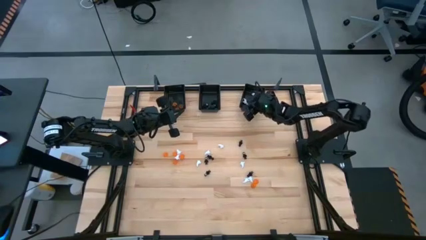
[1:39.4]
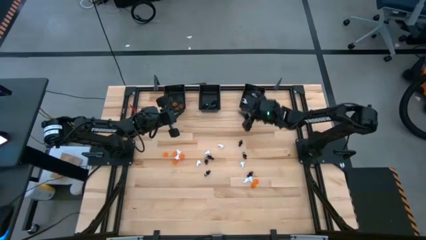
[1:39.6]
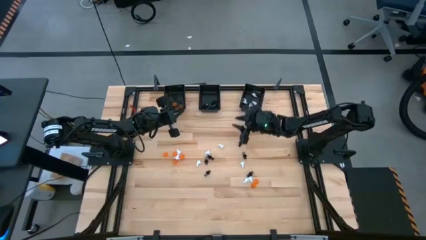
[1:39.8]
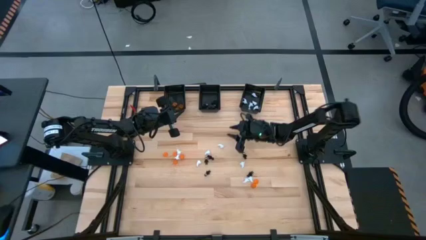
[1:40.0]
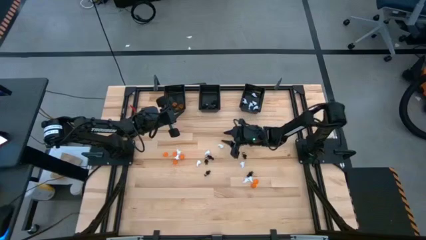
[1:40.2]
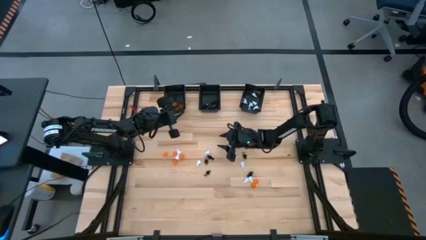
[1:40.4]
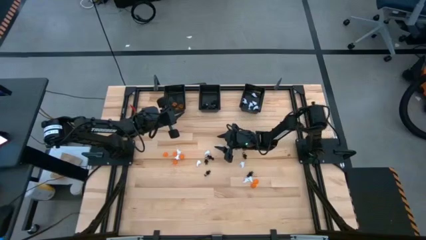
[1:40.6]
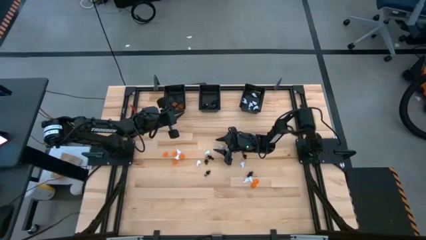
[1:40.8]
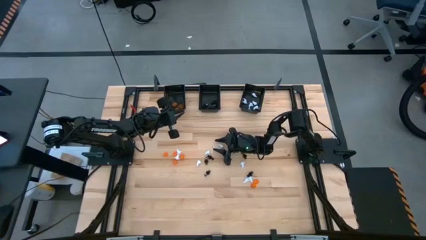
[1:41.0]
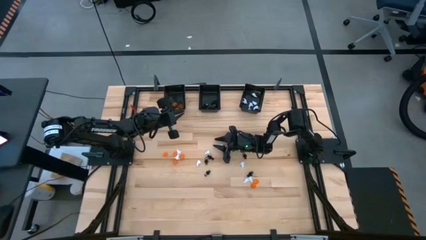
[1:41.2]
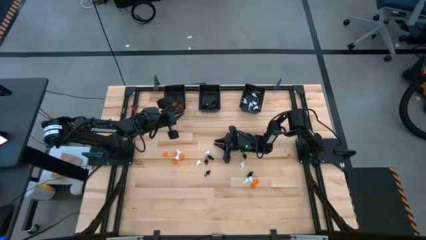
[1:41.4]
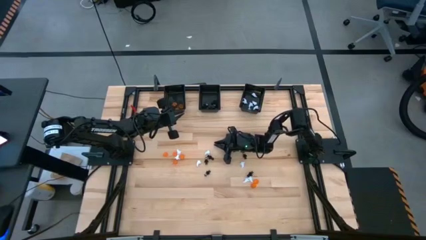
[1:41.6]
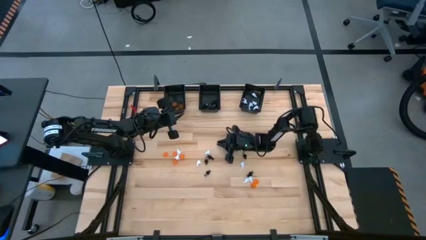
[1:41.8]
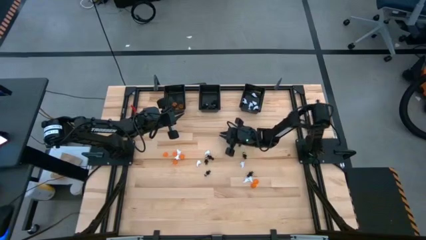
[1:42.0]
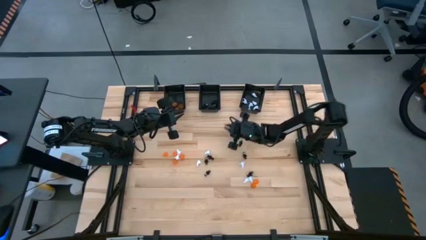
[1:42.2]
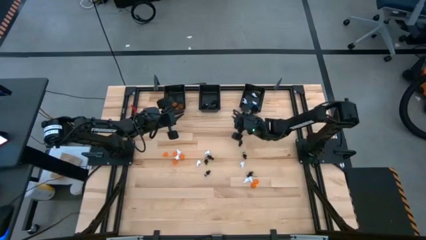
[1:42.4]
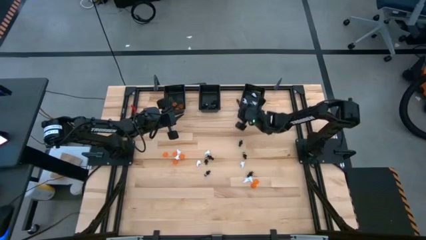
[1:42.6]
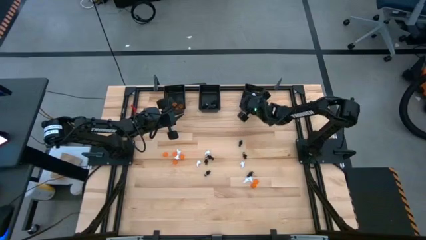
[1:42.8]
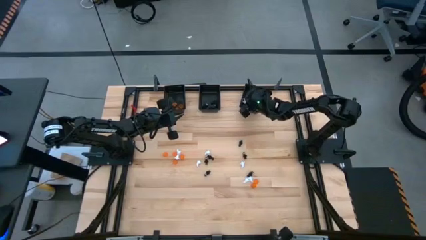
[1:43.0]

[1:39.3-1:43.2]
Task: Sort Halloween decoration
Put the white ghost toy into the right black basket

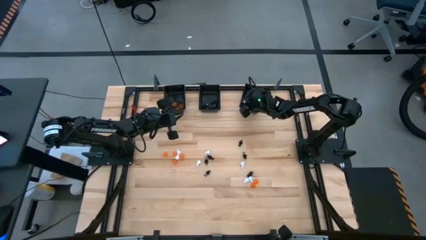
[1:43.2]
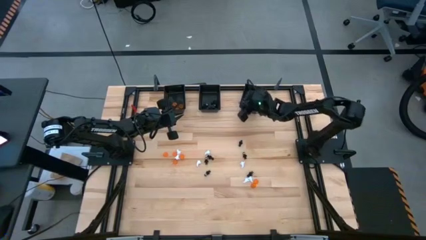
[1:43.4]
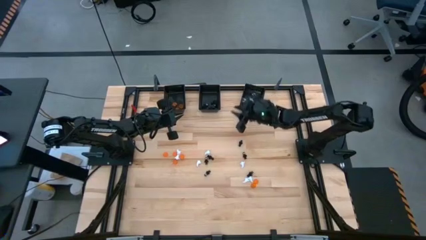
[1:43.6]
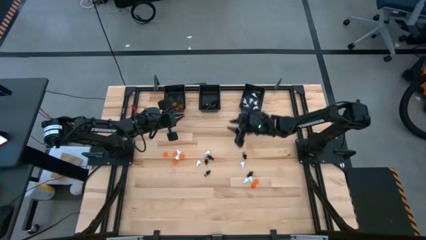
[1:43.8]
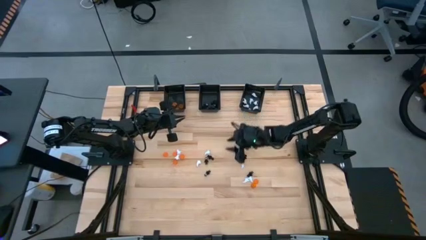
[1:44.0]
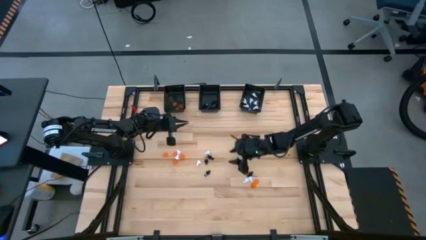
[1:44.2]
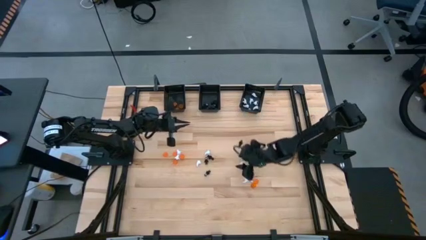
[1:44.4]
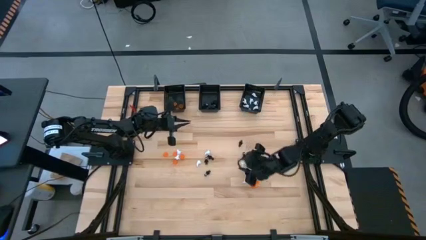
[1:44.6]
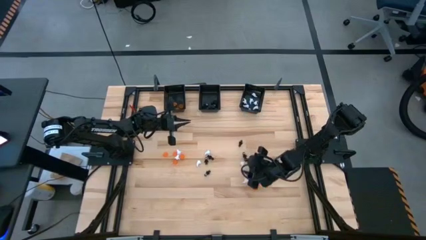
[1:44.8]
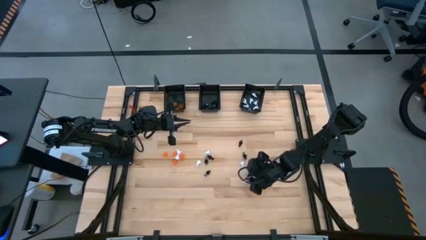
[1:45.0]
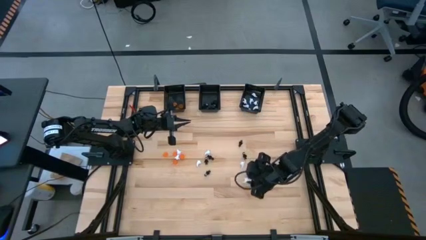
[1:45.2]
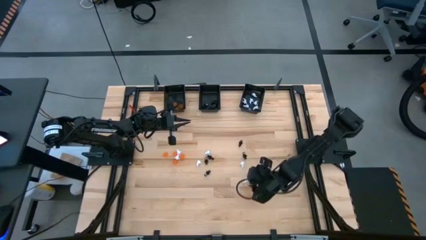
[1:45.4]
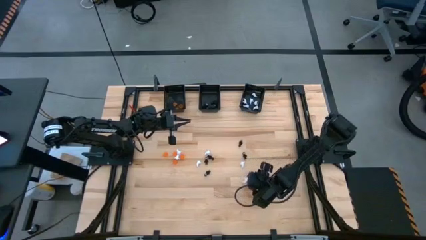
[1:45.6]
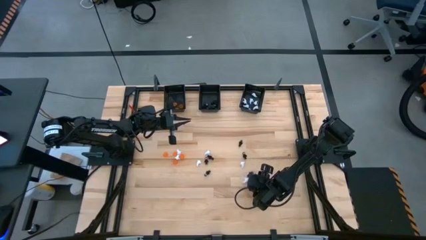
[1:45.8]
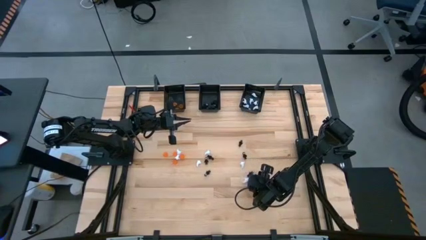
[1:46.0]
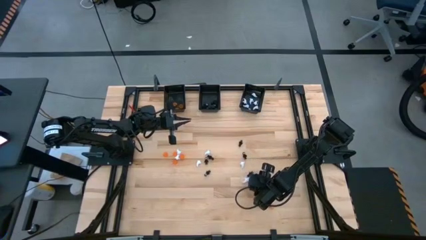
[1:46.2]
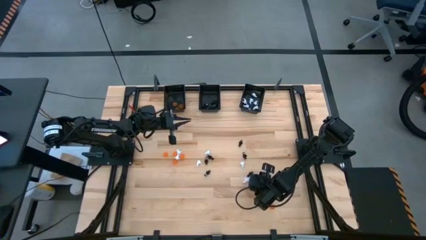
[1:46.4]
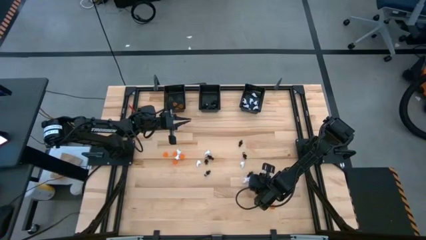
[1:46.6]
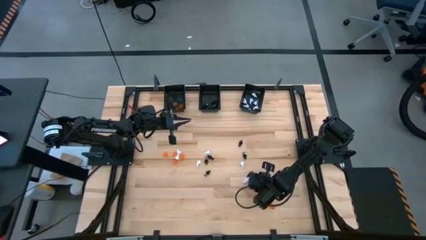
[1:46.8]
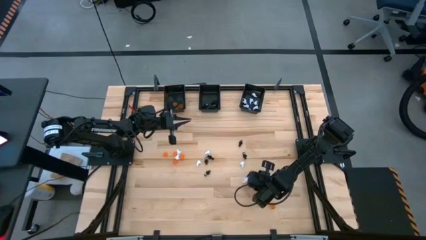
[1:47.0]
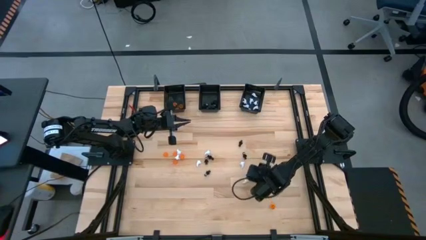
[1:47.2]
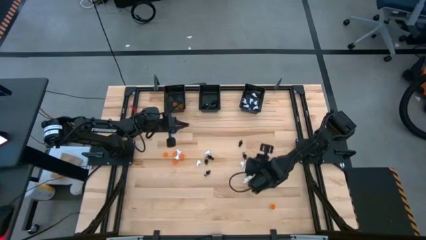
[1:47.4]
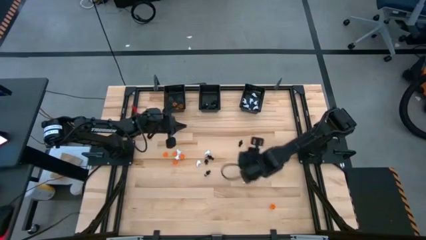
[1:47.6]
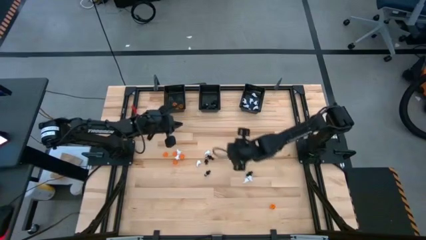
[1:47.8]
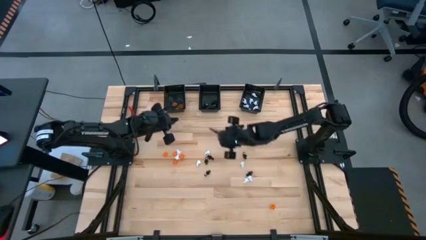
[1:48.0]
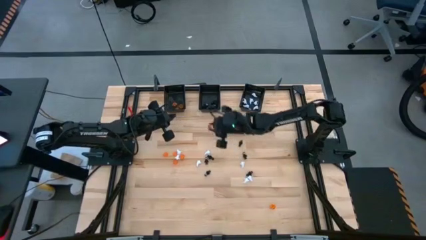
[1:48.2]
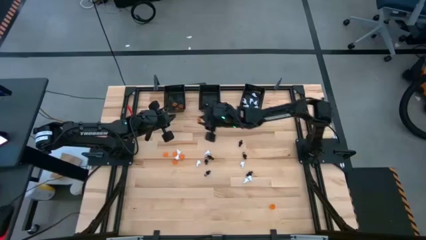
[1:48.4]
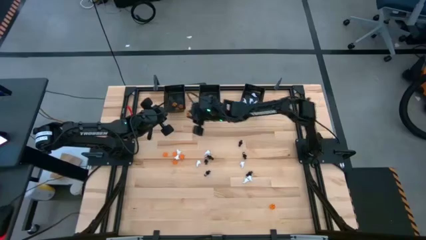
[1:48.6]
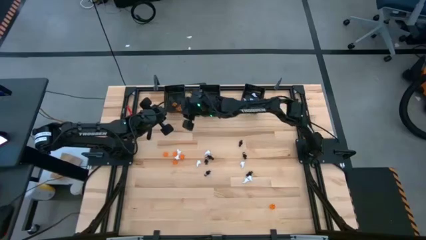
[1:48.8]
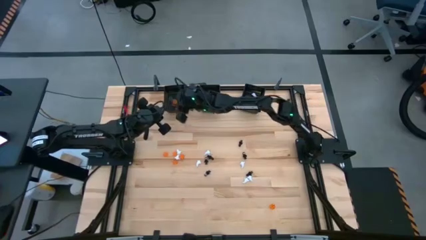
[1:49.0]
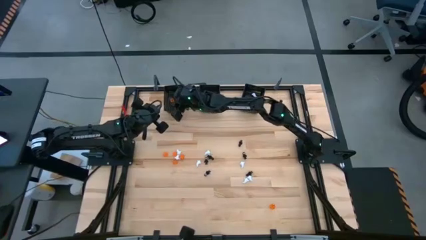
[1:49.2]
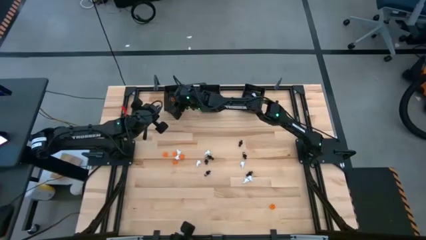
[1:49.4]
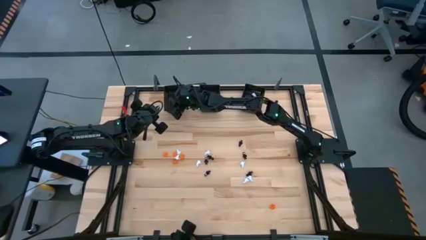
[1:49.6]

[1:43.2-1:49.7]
Put the orange pumpkin toy into the left black basket

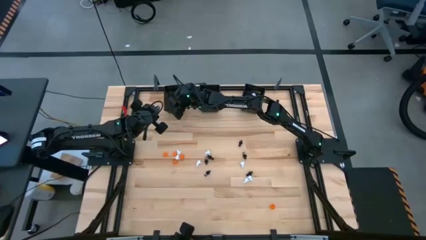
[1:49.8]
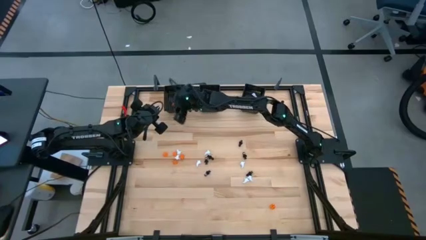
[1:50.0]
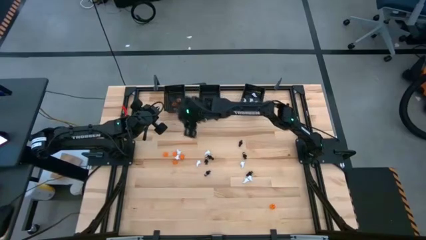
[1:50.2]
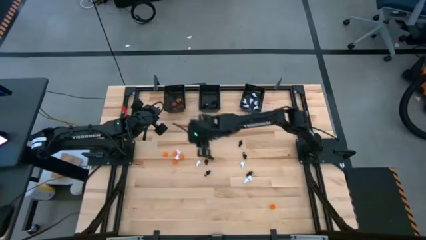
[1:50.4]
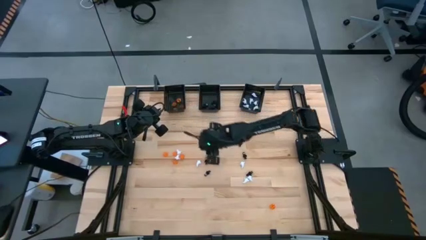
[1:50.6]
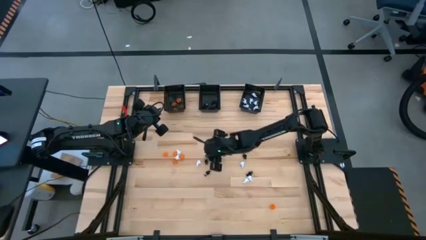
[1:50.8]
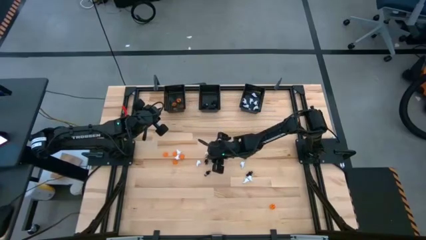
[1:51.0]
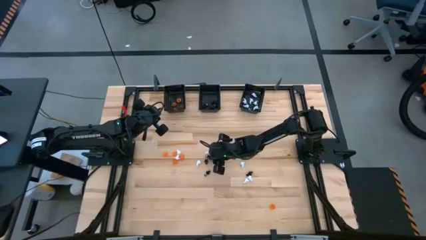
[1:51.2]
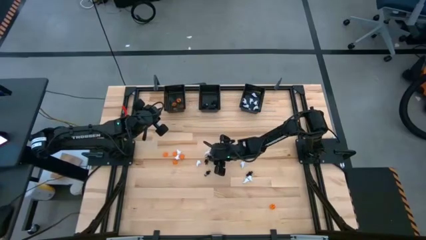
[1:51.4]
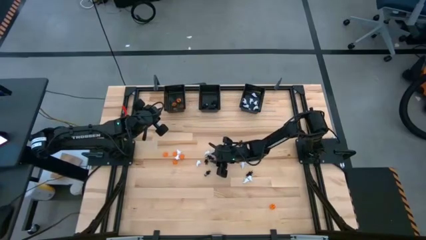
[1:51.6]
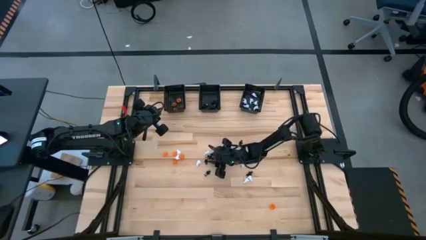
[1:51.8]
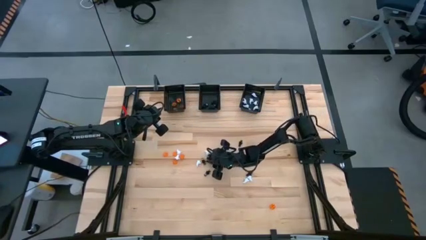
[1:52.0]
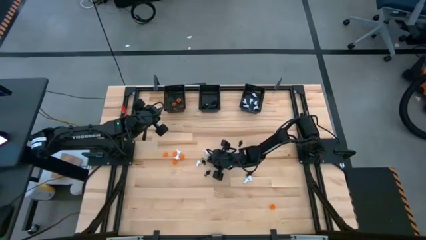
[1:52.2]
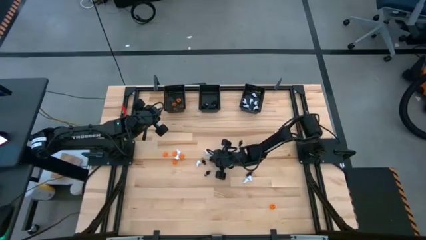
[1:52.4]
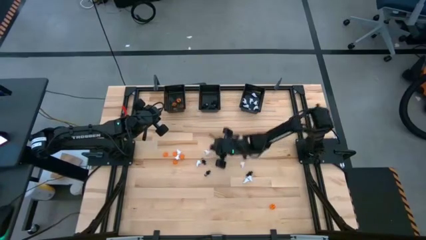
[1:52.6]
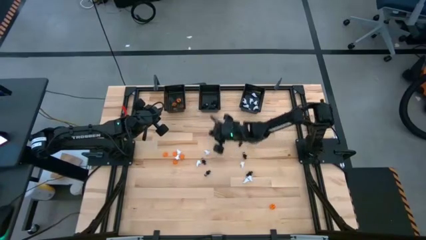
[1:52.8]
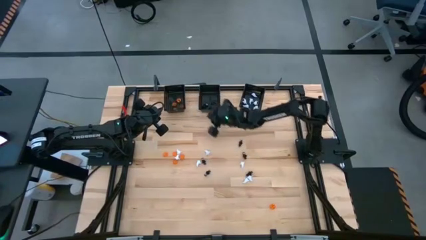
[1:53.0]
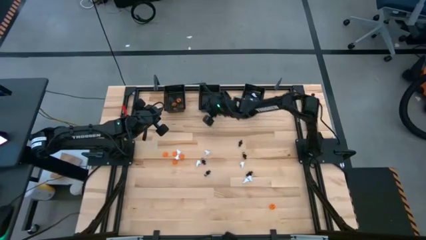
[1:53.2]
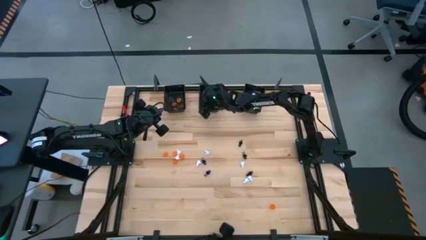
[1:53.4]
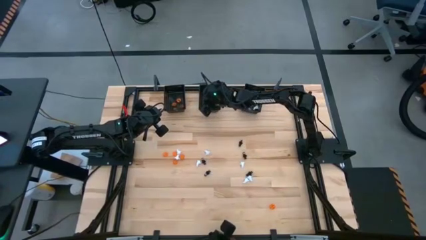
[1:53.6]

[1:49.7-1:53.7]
Put the black skeleton toy into the black middle basket

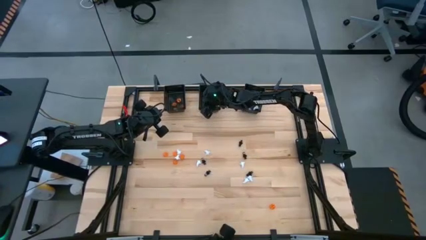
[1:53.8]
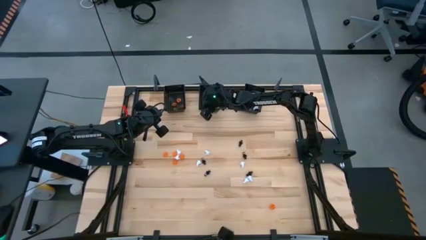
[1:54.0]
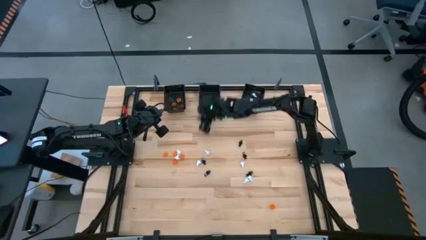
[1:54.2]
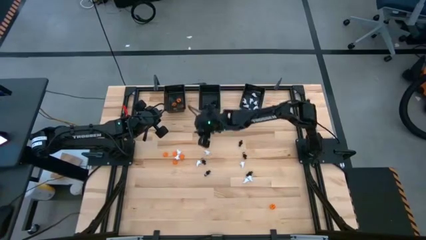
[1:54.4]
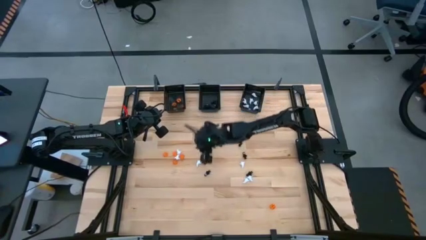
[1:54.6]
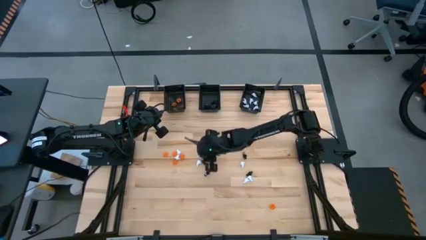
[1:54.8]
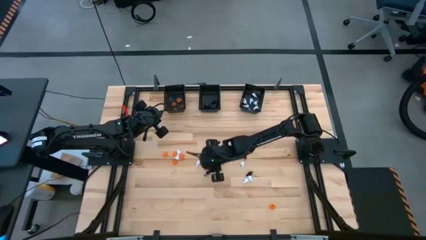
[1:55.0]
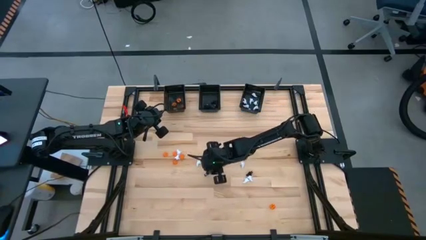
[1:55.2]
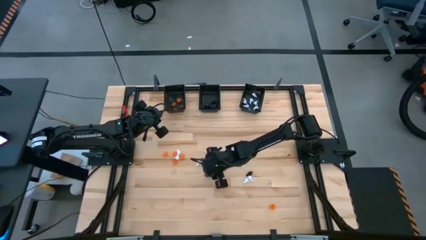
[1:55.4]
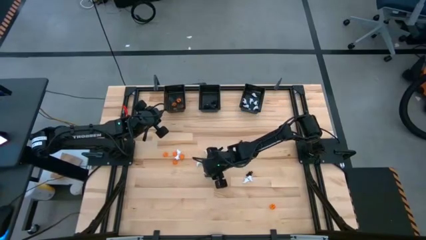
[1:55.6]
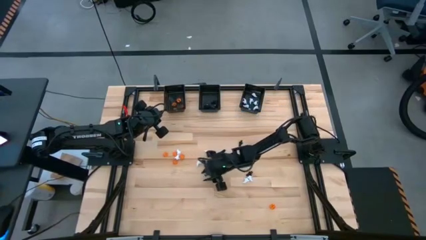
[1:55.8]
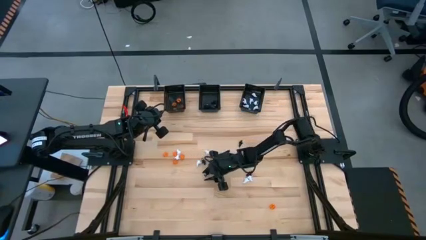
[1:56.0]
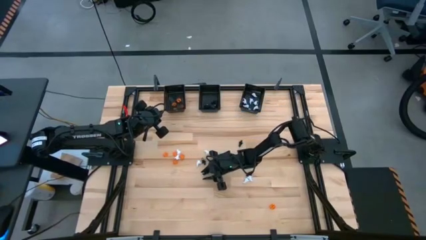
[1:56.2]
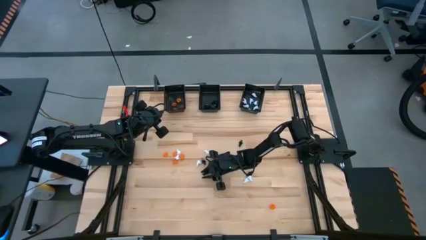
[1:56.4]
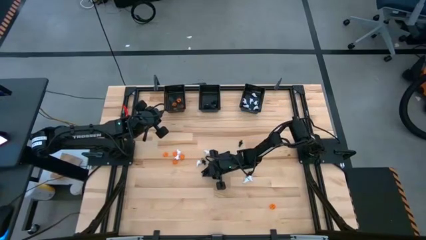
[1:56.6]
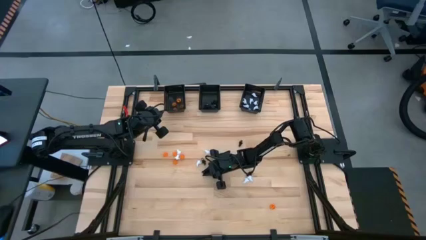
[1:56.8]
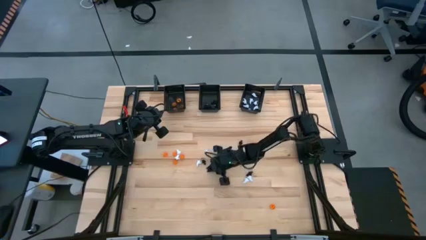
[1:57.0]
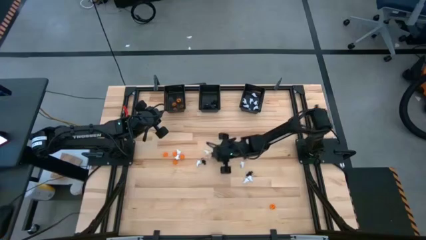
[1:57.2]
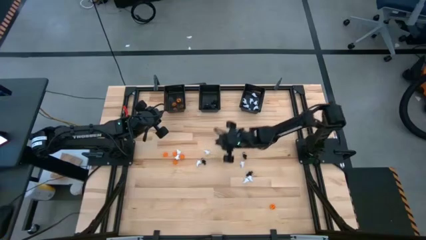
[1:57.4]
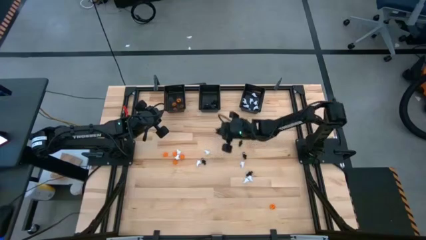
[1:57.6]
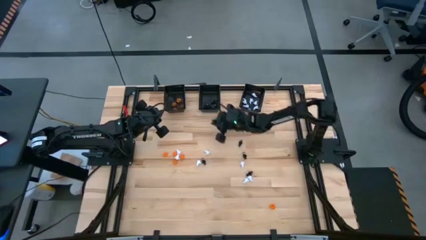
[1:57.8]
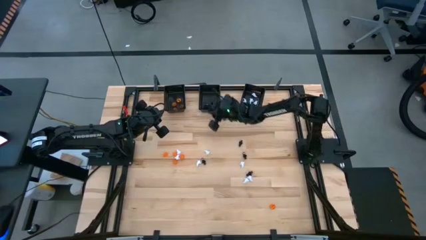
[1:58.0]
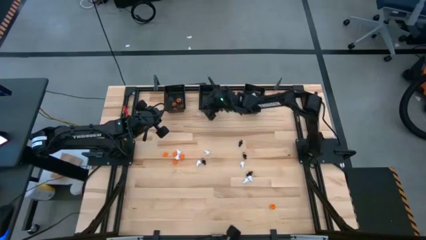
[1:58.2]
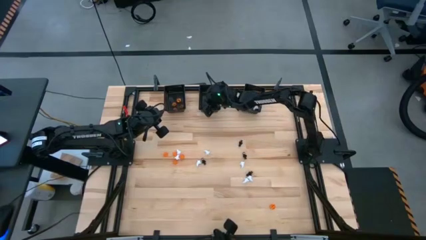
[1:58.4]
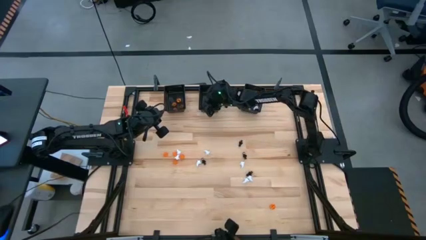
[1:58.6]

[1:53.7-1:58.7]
Put the black skeleton toy into the black middle basket
